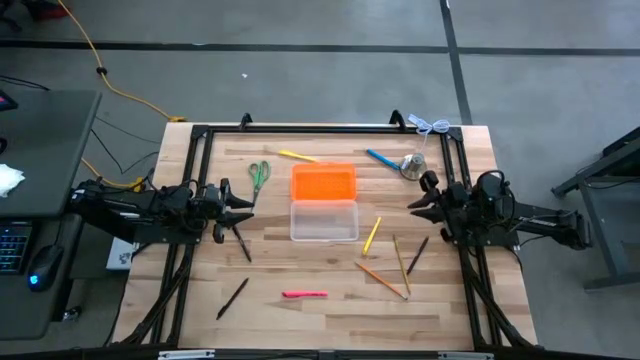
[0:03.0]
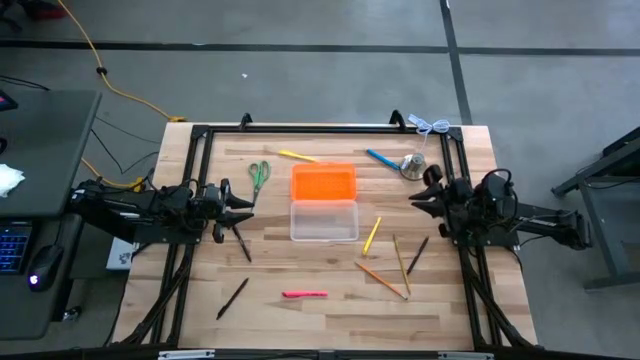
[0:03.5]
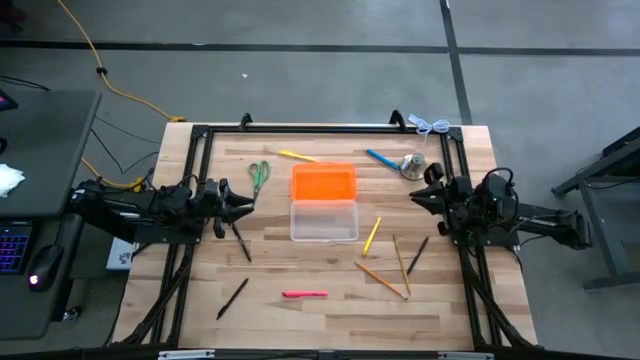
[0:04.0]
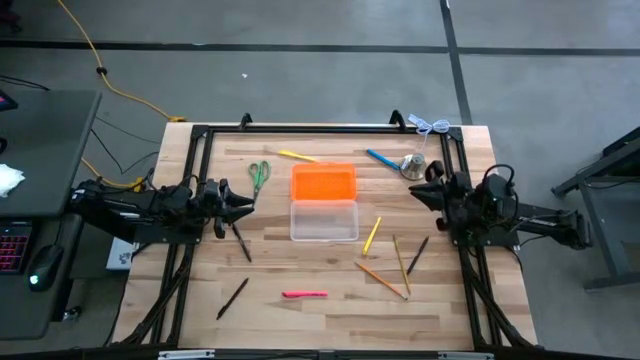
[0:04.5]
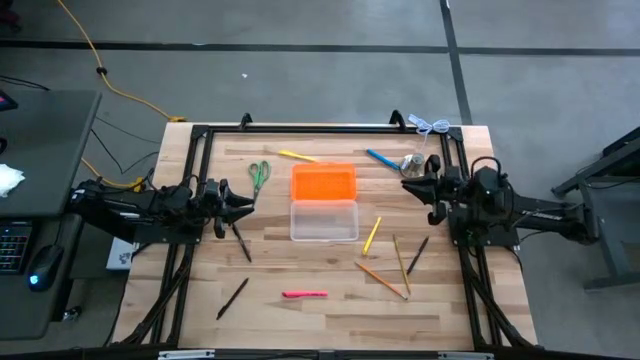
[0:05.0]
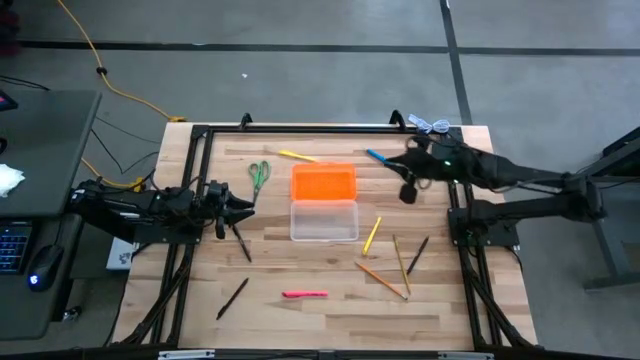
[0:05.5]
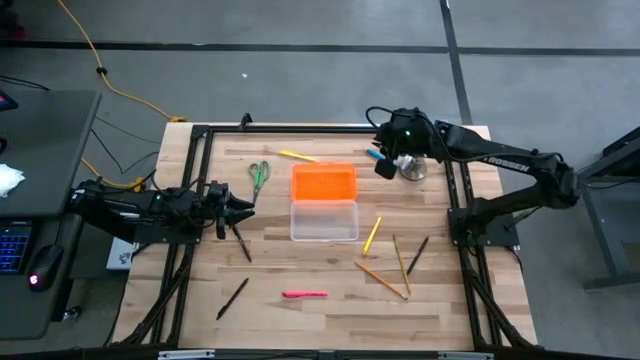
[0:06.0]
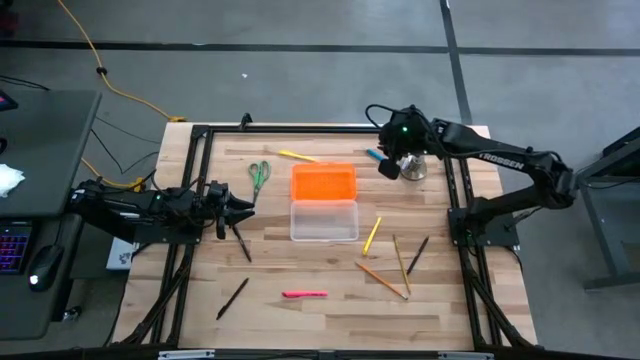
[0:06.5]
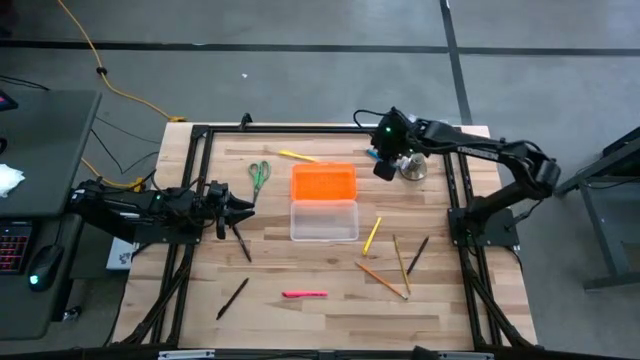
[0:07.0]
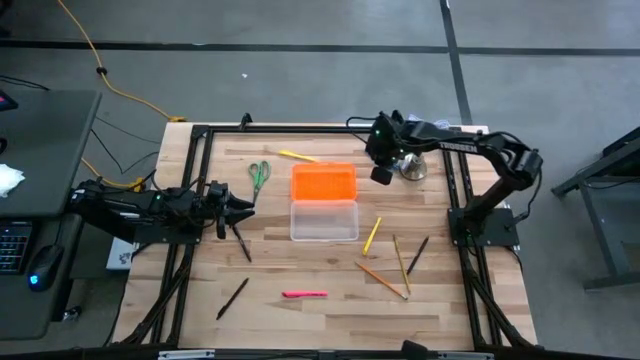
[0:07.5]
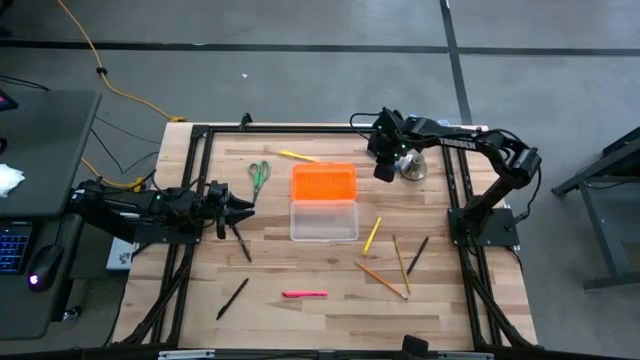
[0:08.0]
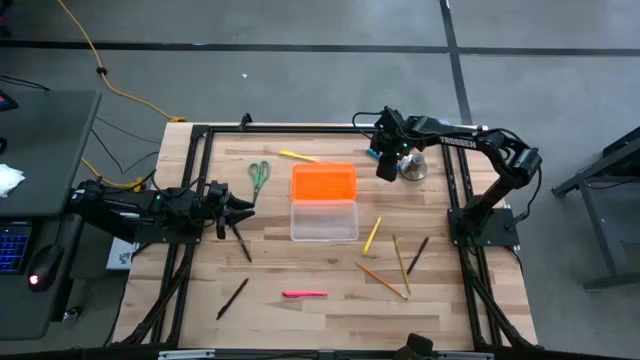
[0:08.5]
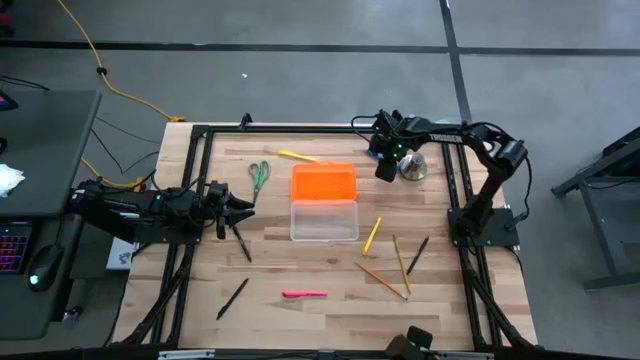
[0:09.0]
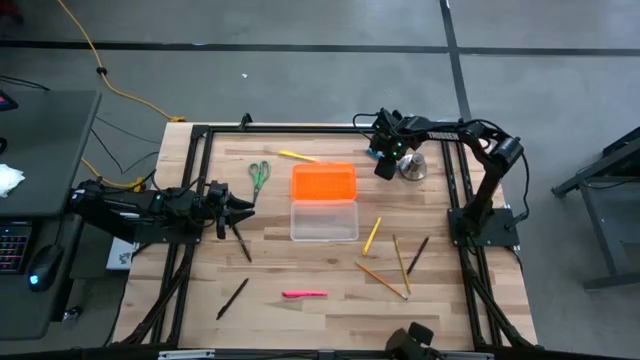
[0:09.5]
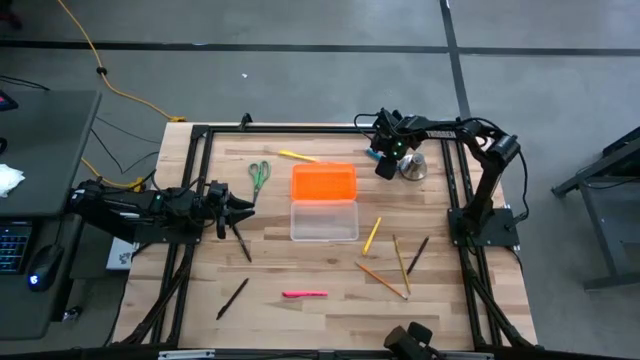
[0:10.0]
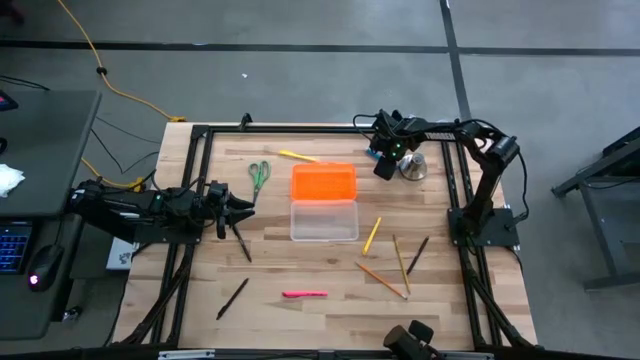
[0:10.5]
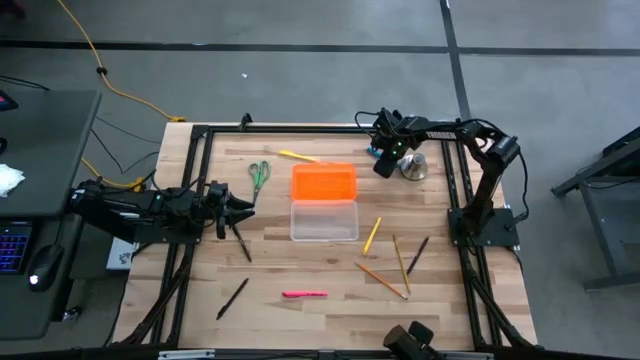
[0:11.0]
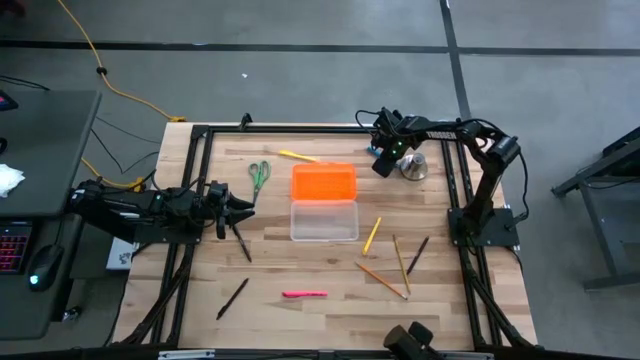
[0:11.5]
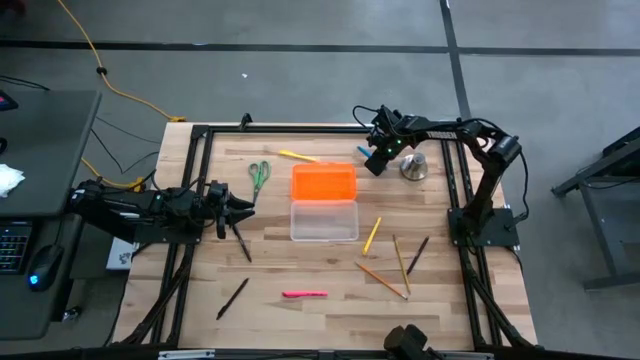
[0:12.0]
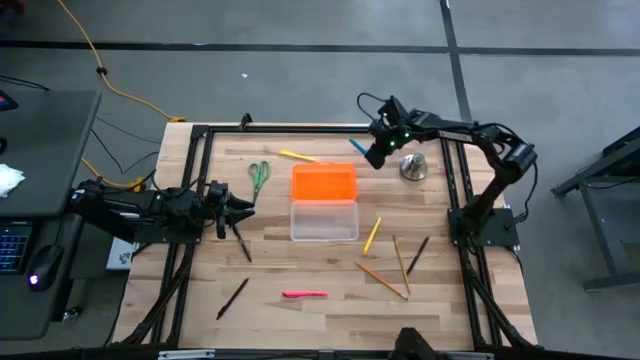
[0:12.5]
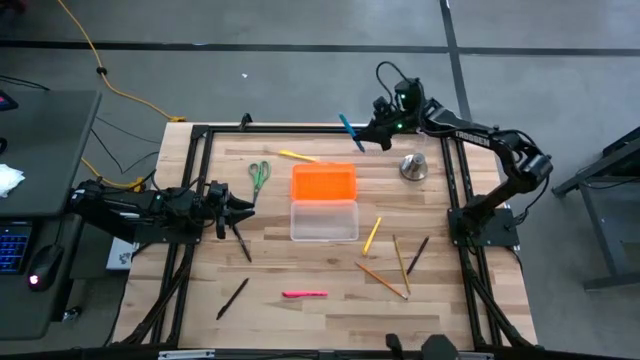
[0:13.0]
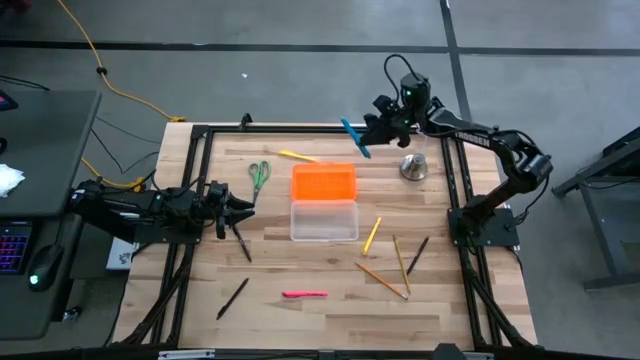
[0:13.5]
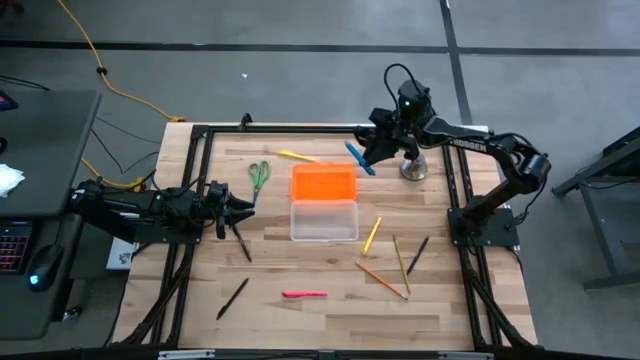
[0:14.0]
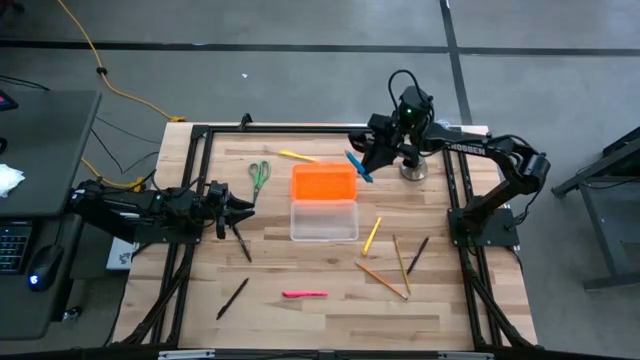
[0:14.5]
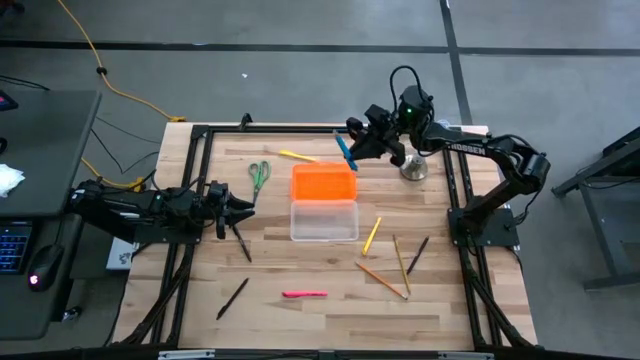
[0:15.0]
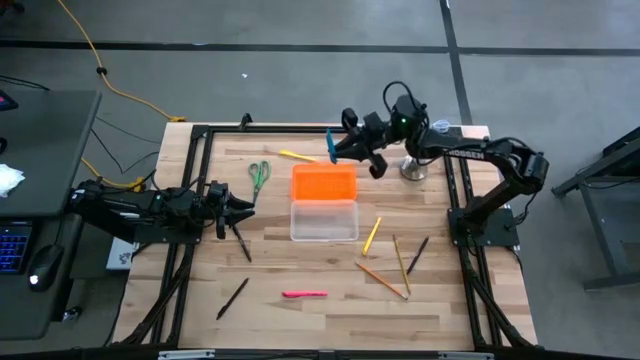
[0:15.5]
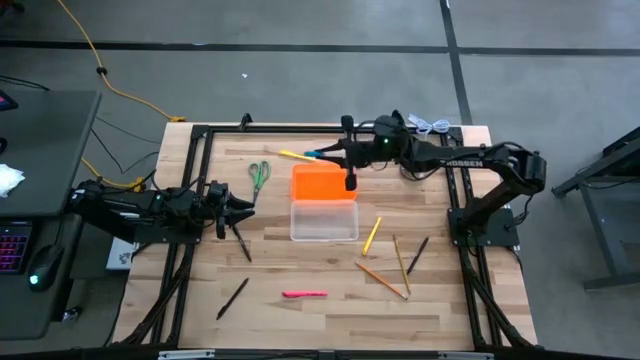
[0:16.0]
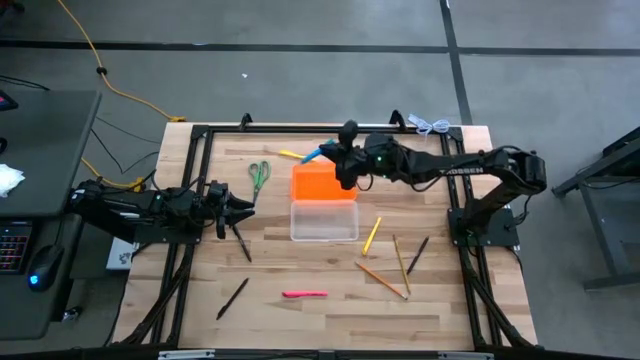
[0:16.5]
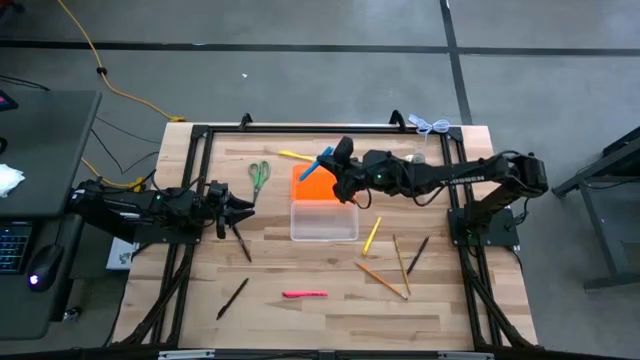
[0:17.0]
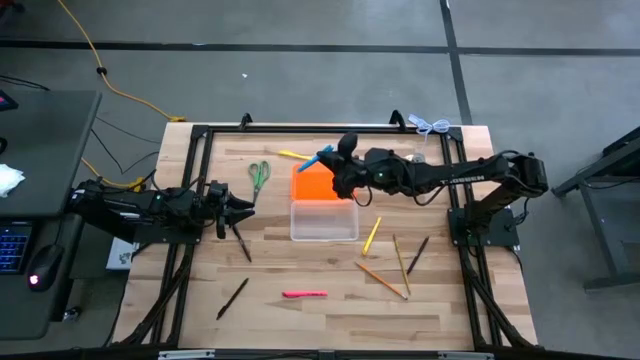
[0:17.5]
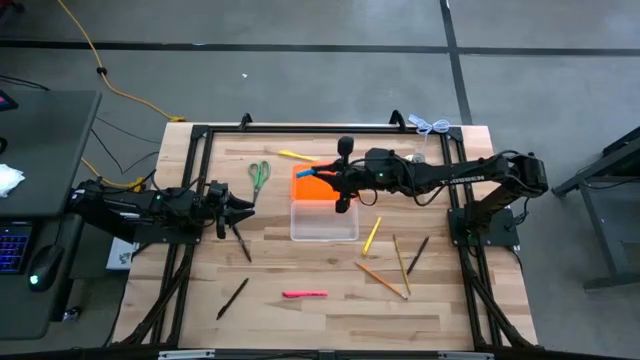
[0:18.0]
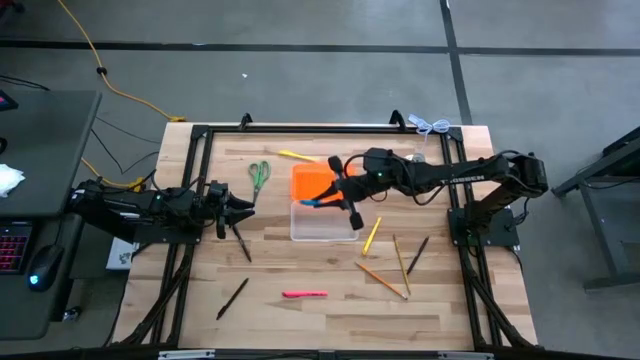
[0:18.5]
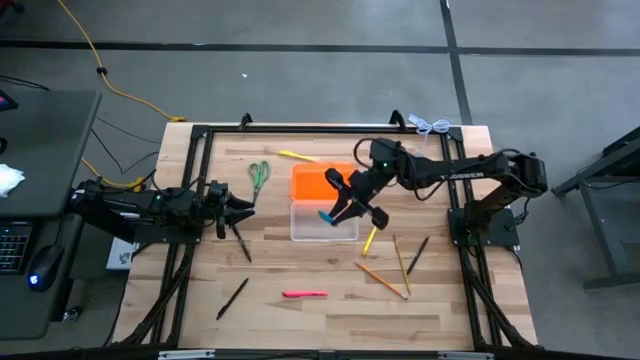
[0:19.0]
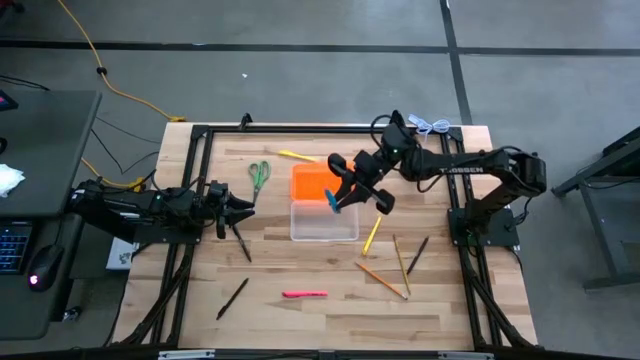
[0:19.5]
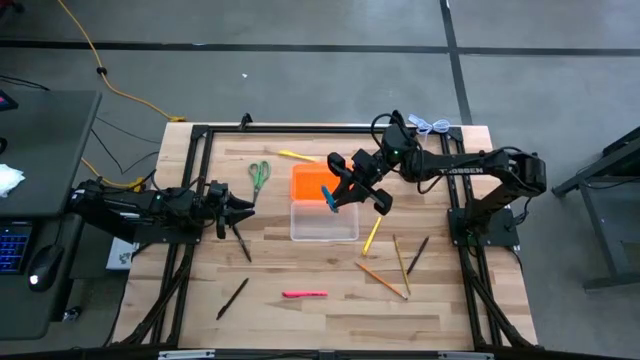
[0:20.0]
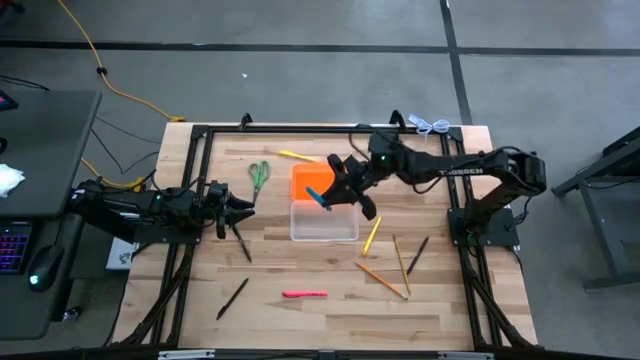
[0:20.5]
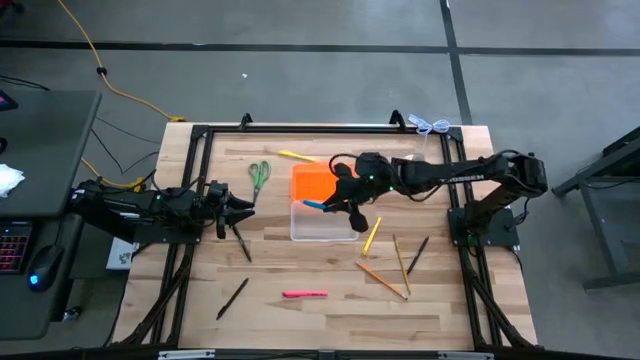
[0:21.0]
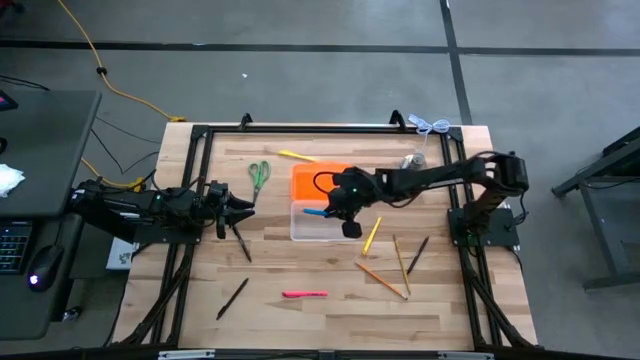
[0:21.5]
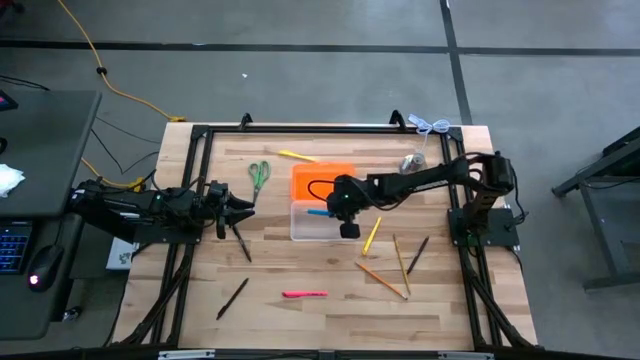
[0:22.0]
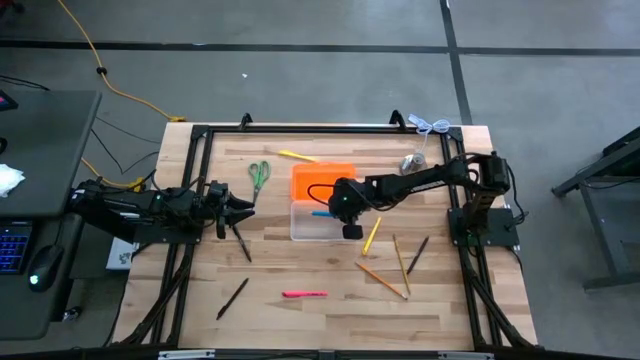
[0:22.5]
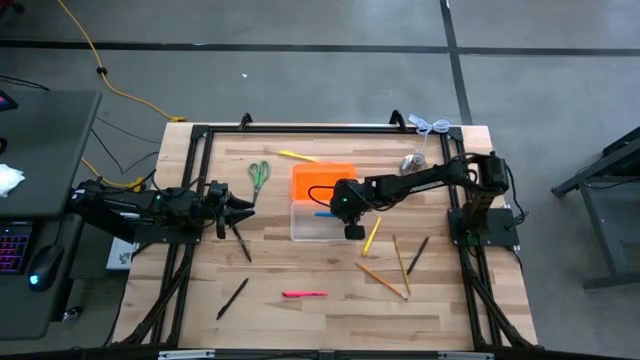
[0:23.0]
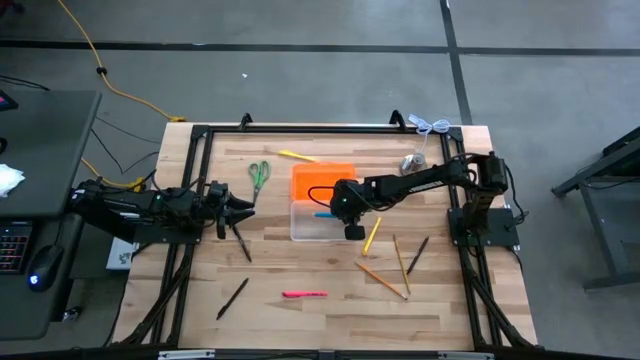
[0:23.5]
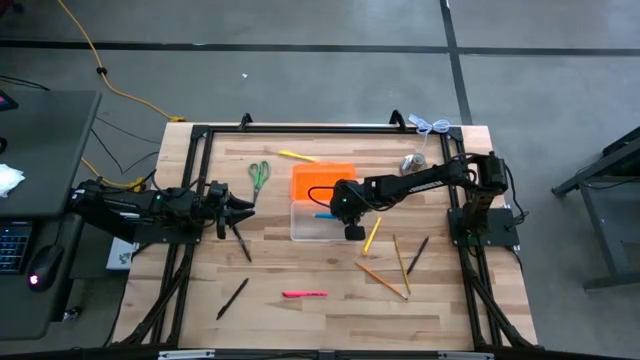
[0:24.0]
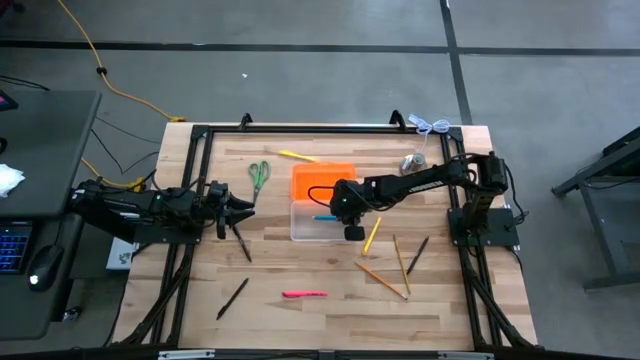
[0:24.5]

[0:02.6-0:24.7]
Task: Pick & place school supplies into a supply box
Put the blue pen into the orange supply box
